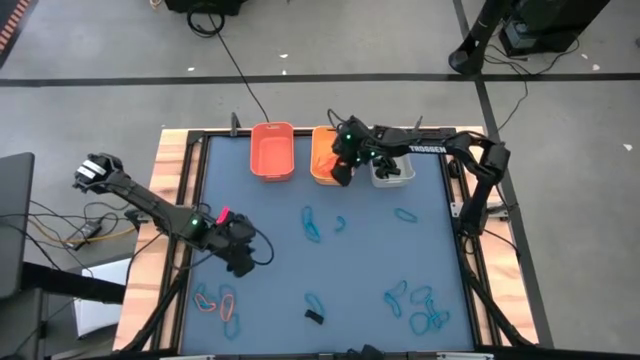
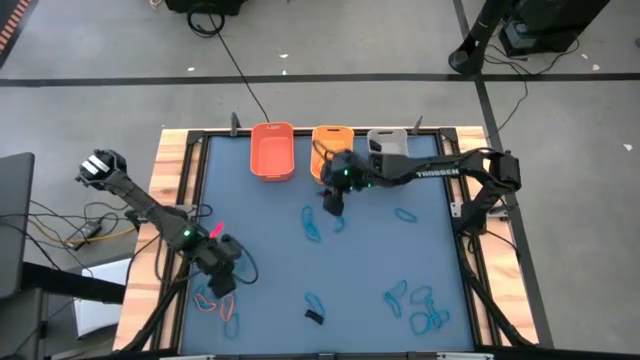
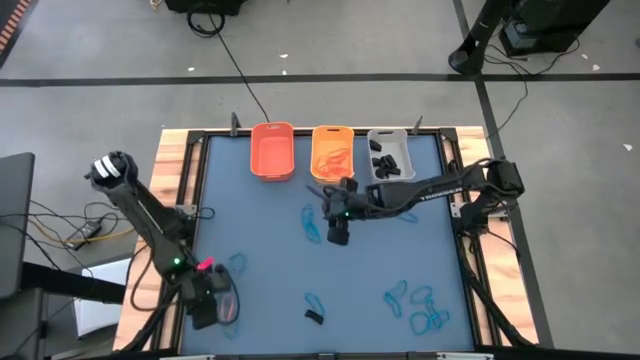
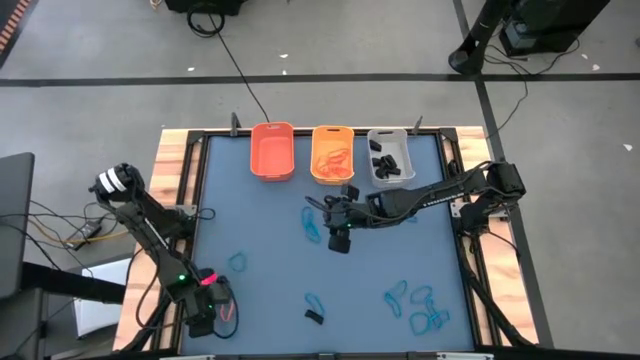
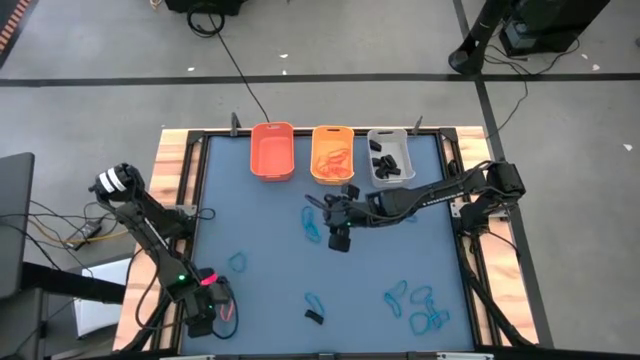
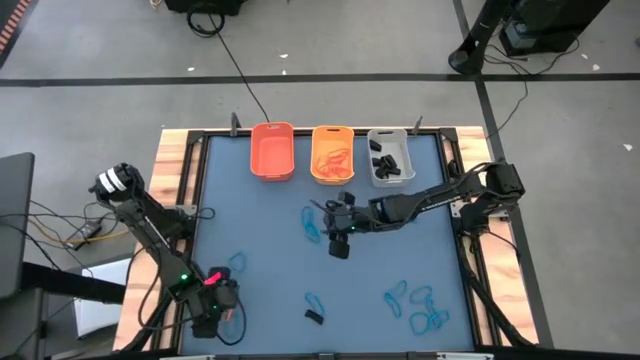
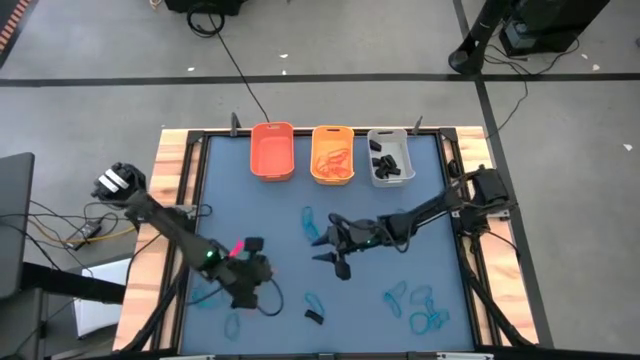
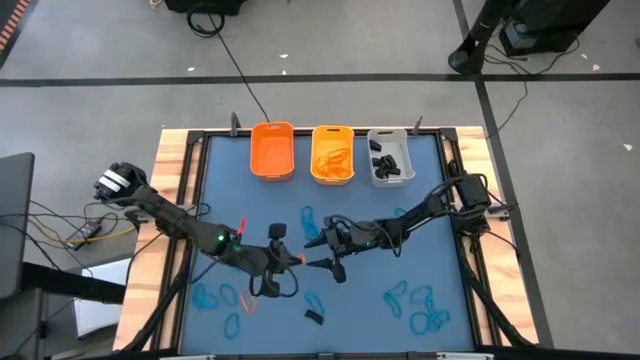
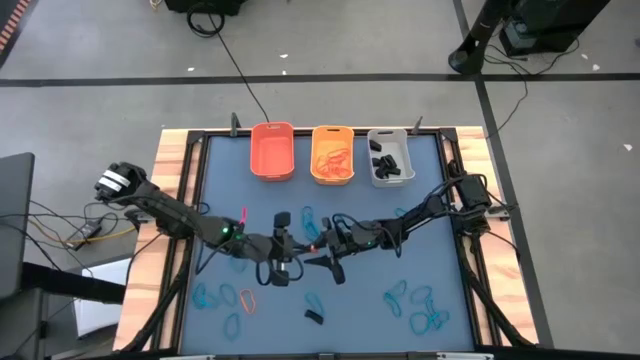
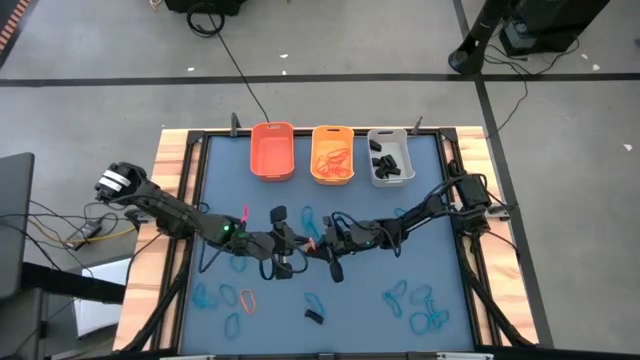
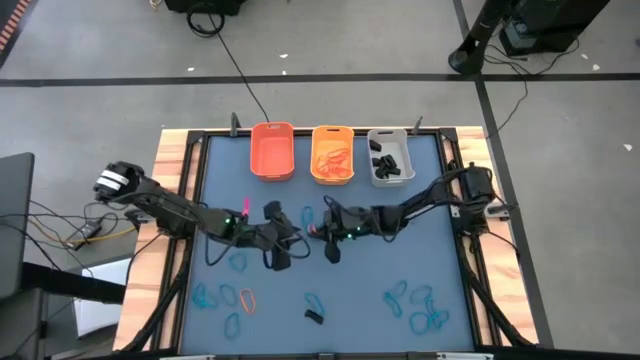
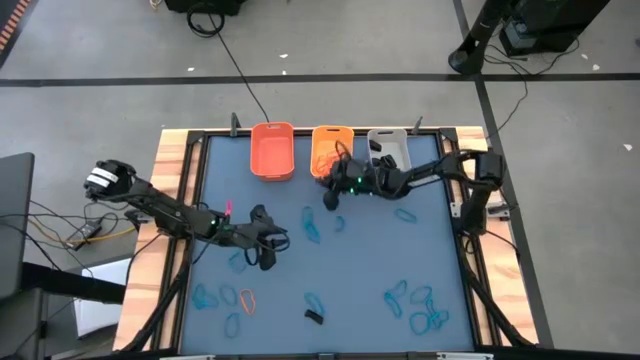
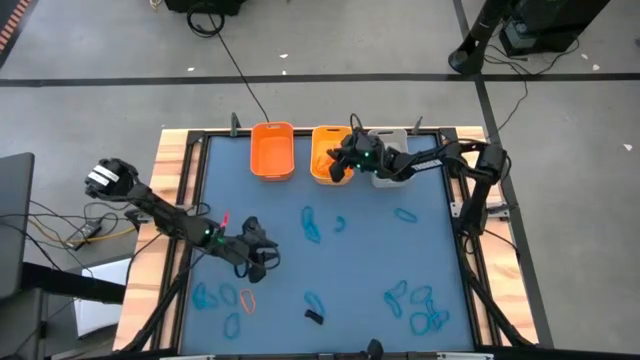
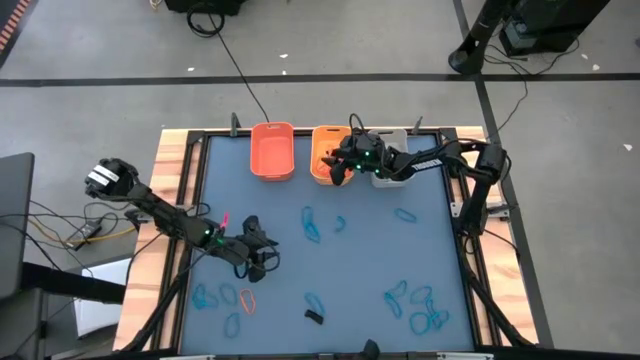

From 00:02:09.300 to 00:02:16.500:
Task: Sort rubber bands into baskets
Put the orange rubber band into the yellow bin

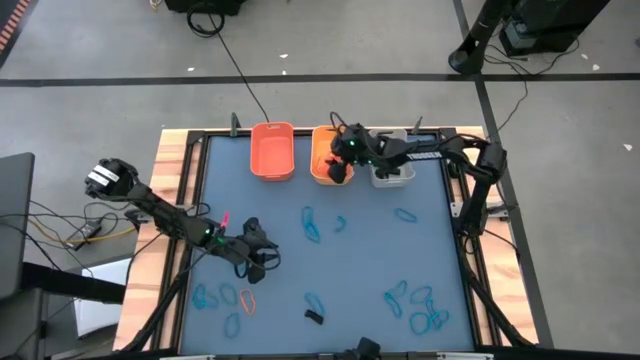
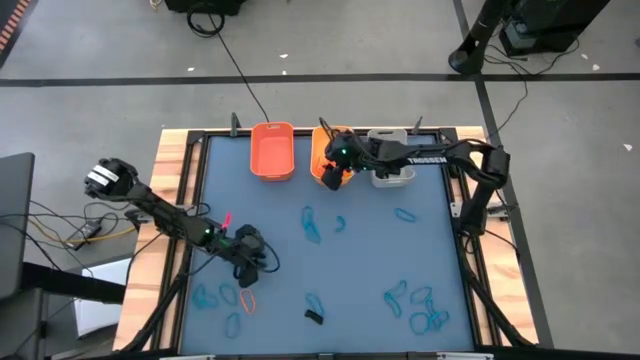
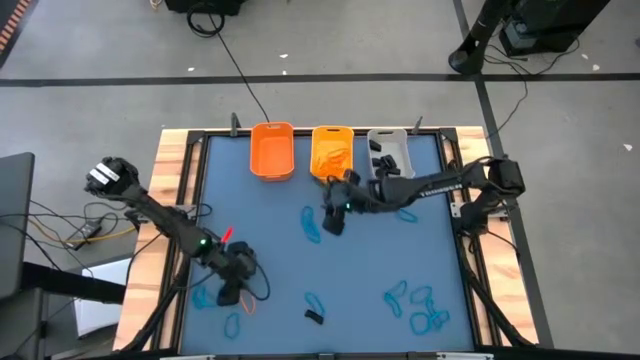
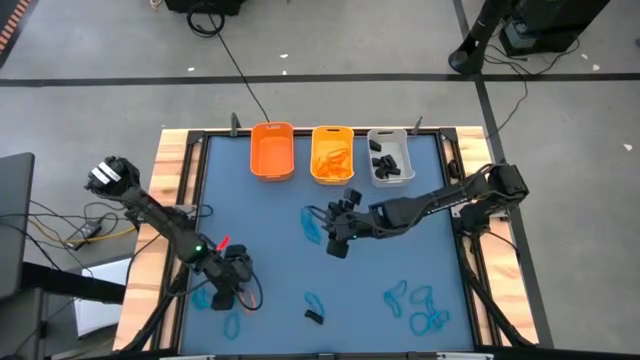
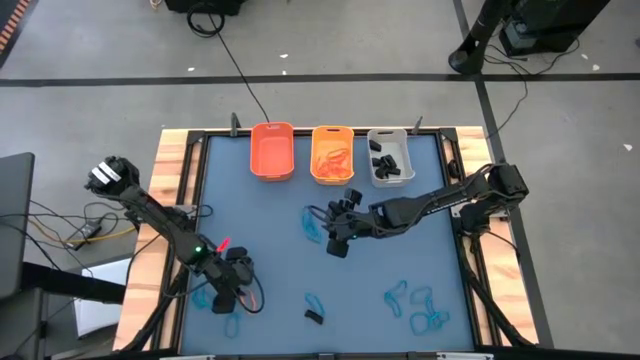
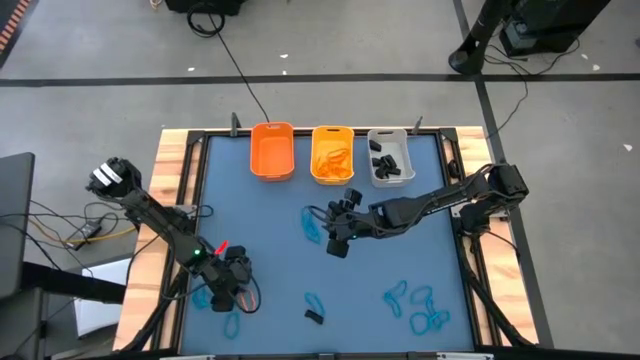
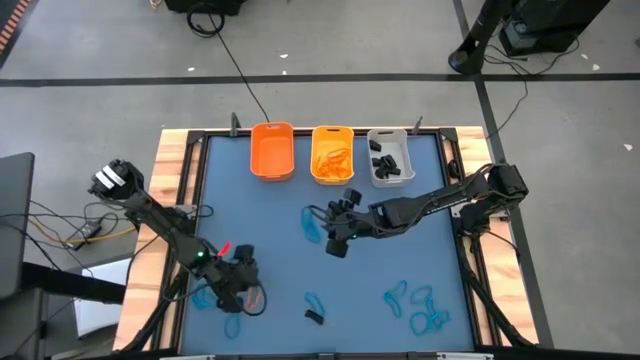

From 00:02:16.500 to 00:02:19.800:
Put the orange rubber band into the yellow bin

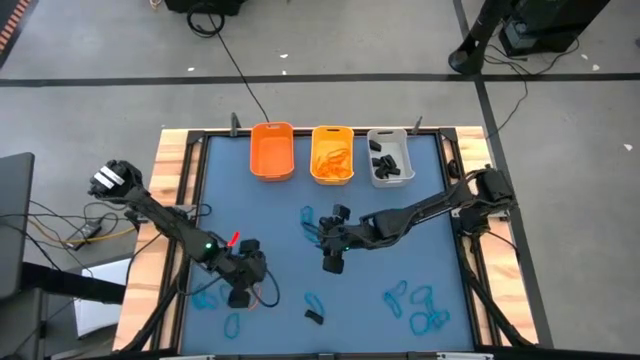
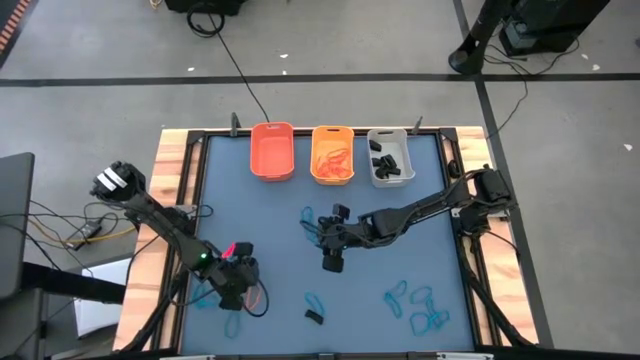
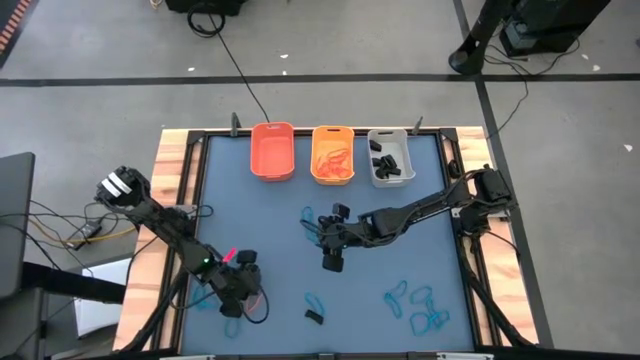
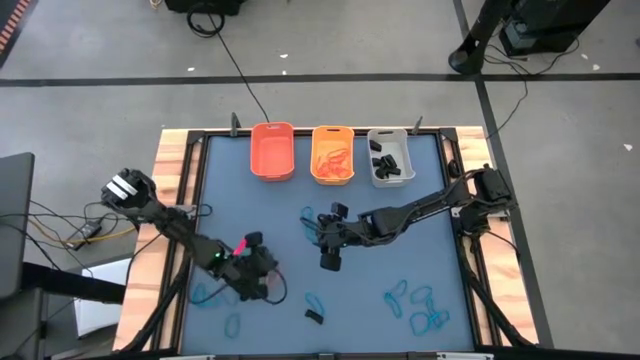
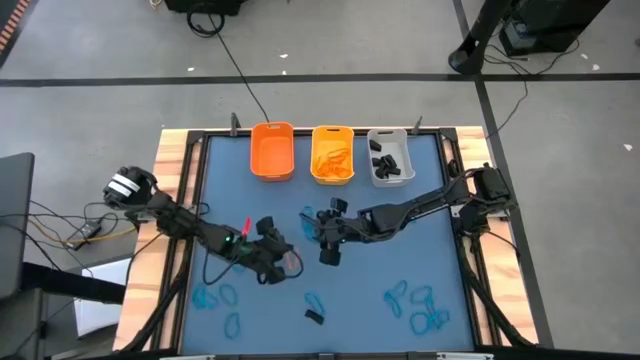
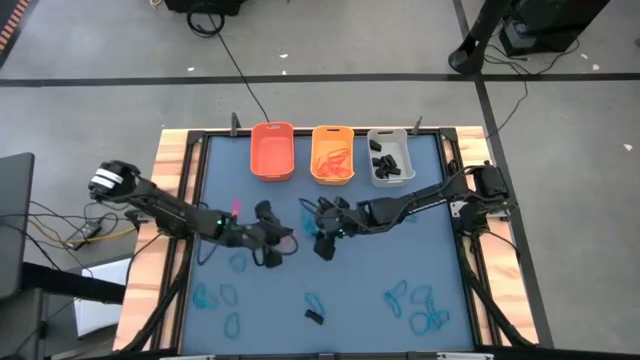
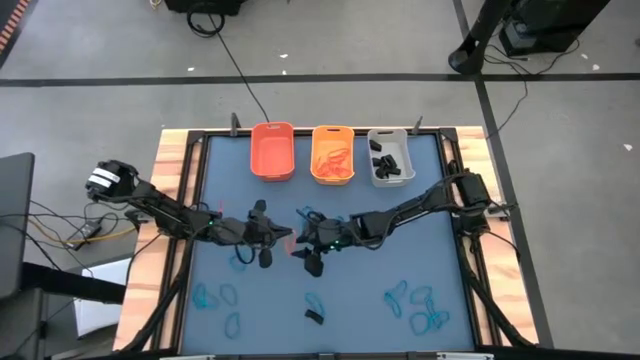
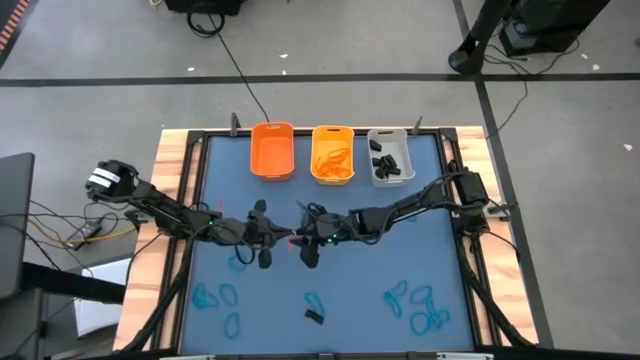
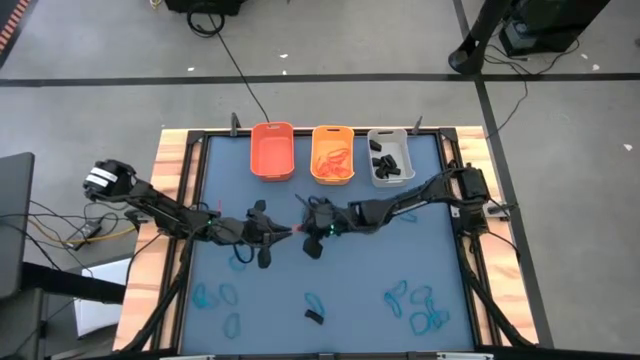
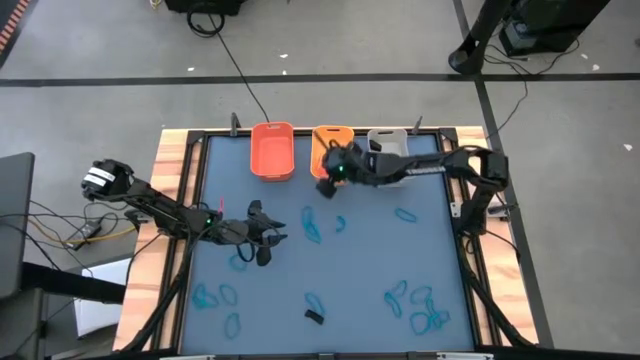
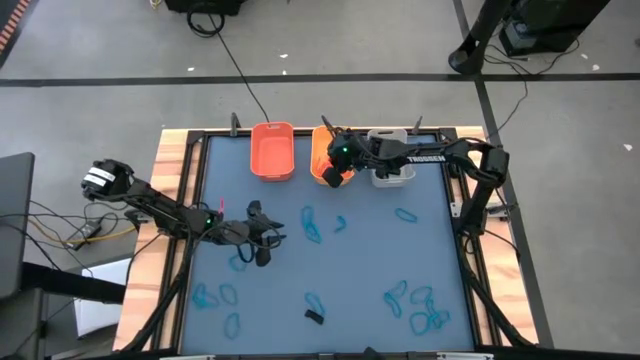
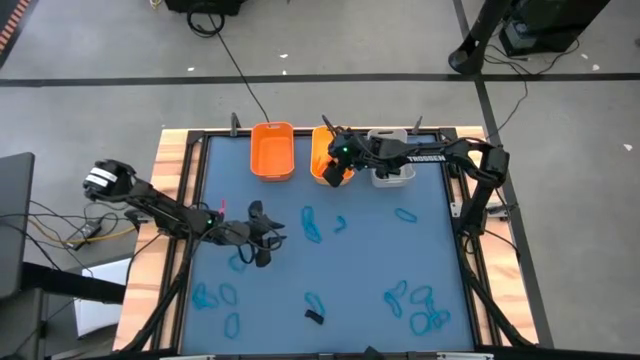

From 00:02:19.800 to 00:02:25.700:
Put the orange rubber band into the yellow bin

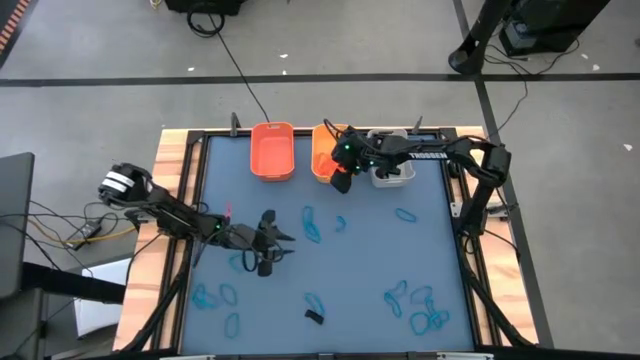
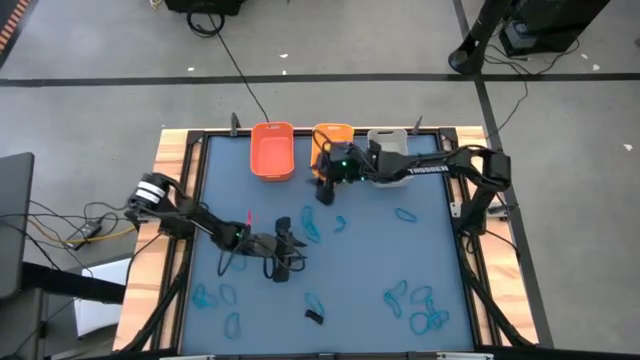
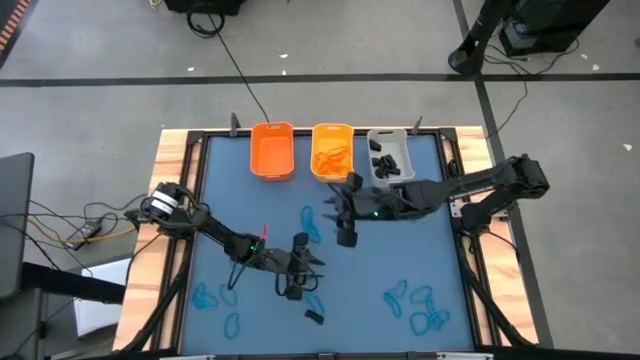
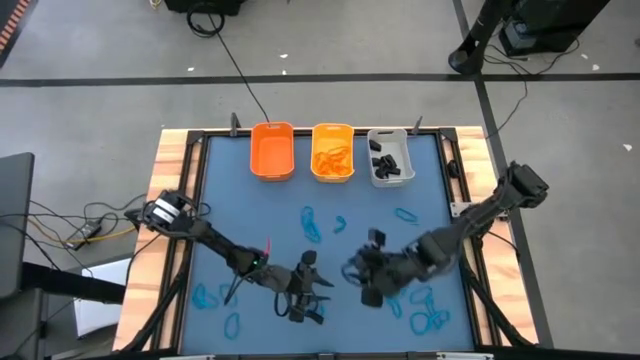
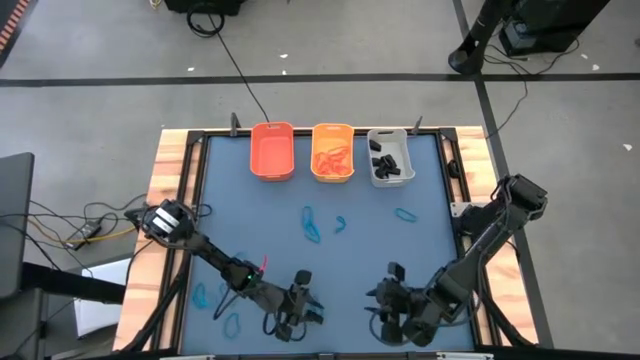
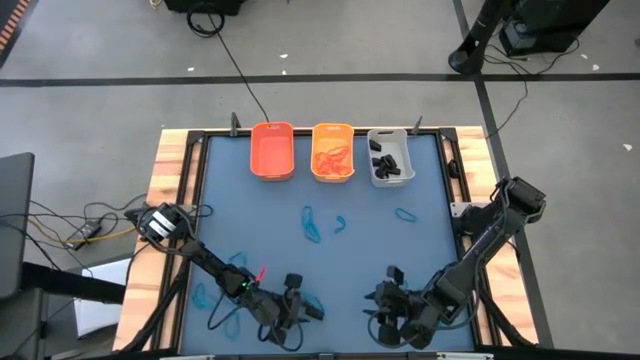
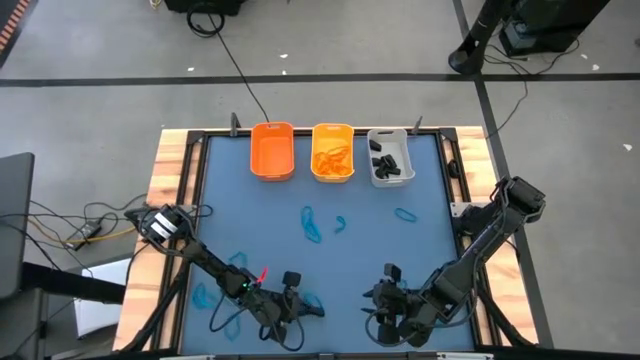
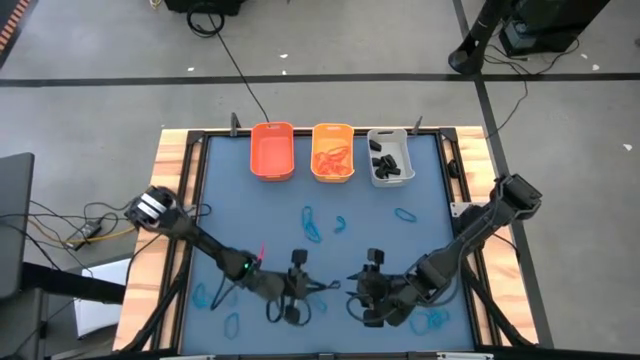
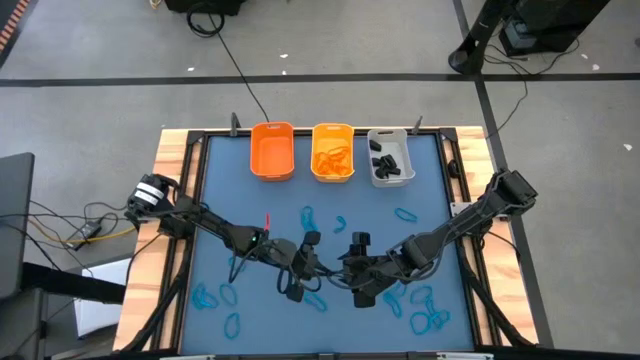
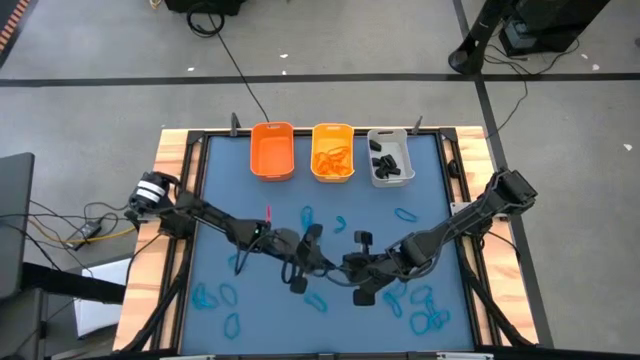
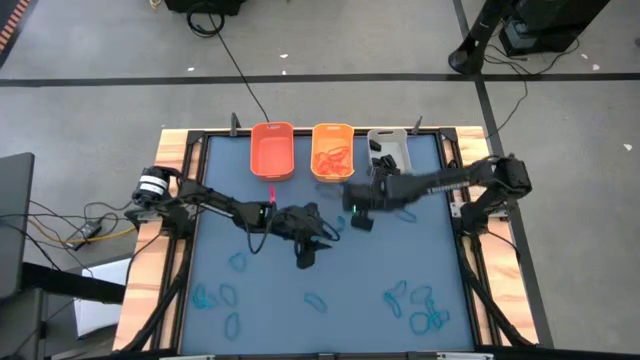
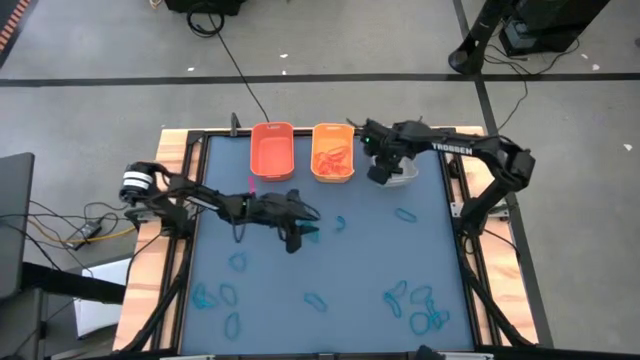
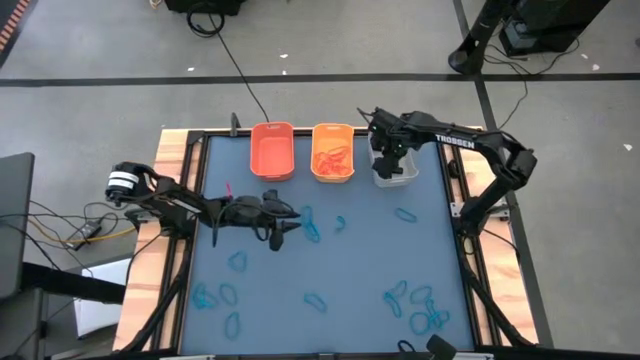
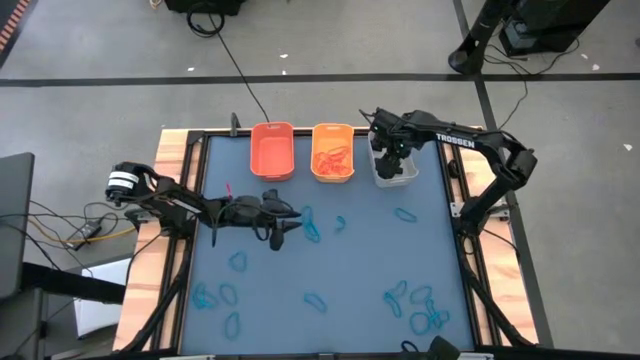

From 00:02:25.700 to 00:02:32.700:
Put the black rubber band into the gray bin
